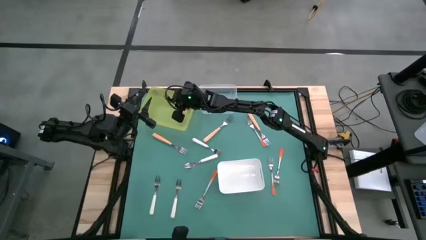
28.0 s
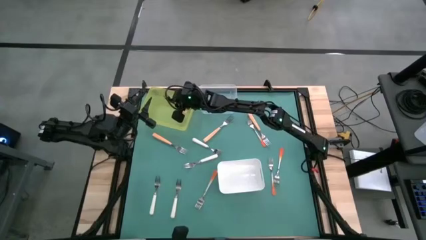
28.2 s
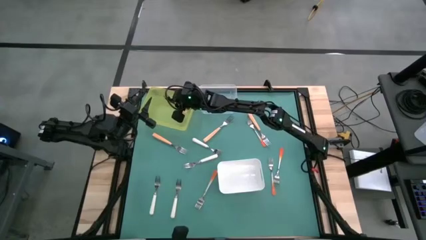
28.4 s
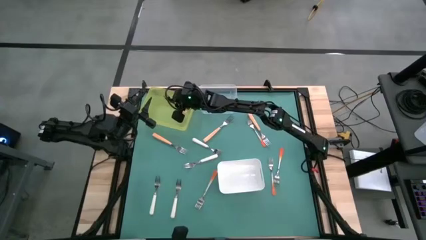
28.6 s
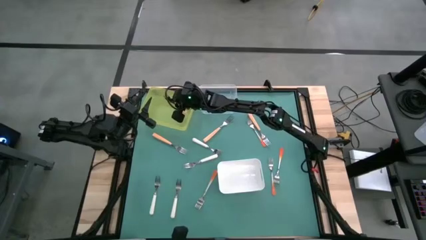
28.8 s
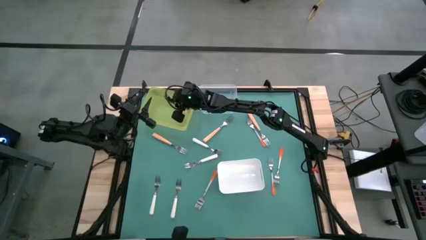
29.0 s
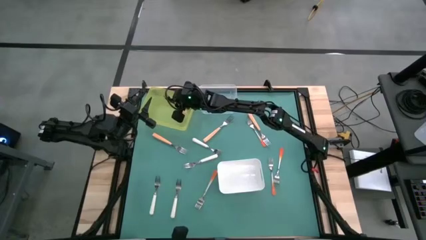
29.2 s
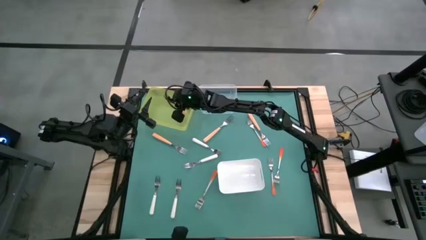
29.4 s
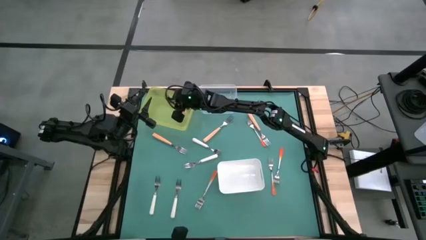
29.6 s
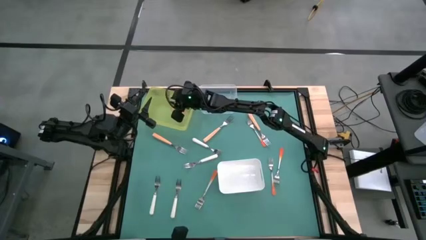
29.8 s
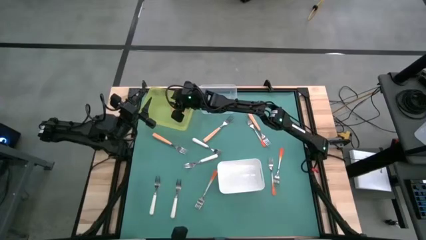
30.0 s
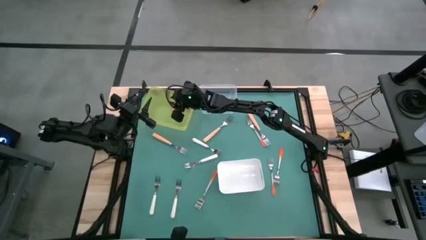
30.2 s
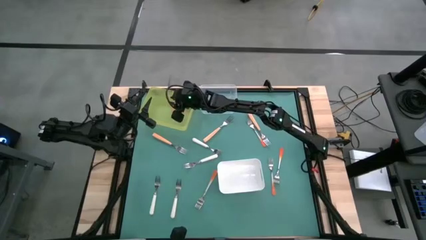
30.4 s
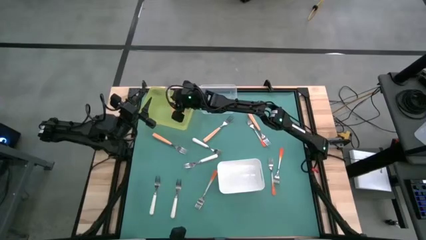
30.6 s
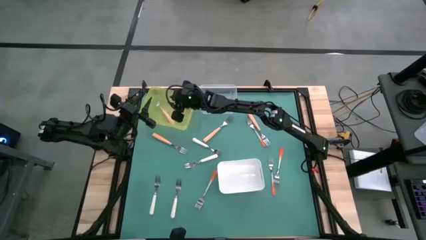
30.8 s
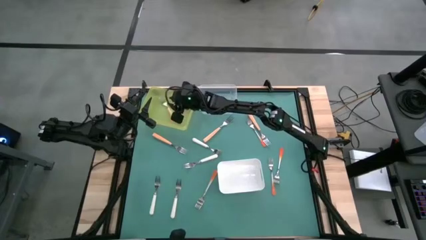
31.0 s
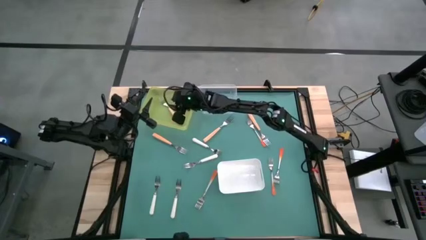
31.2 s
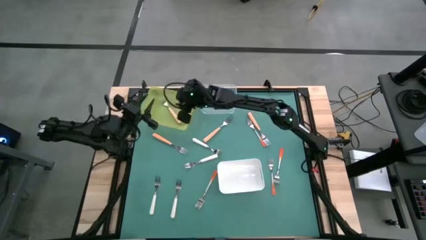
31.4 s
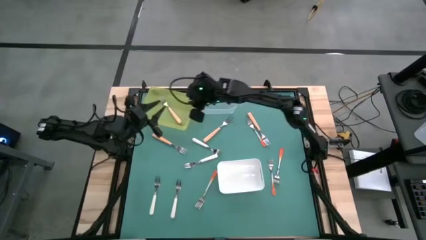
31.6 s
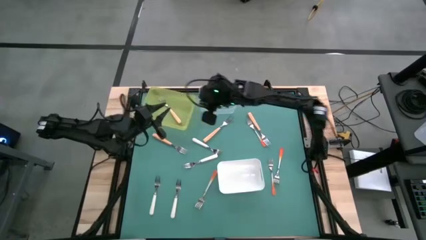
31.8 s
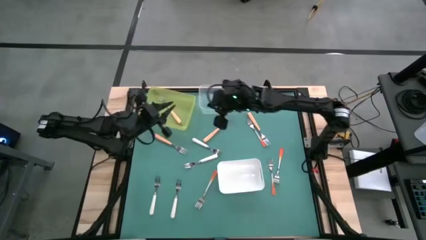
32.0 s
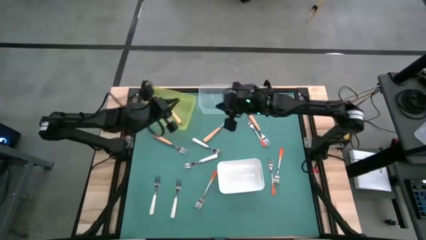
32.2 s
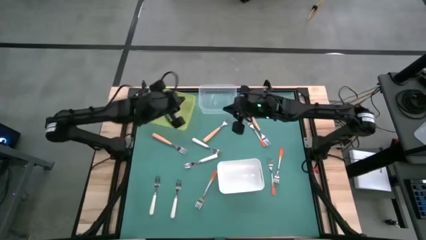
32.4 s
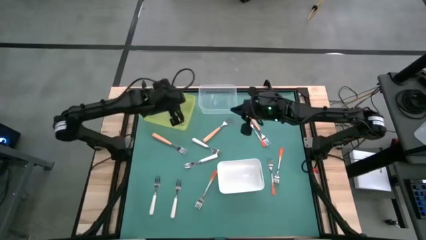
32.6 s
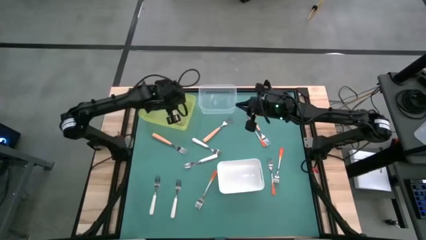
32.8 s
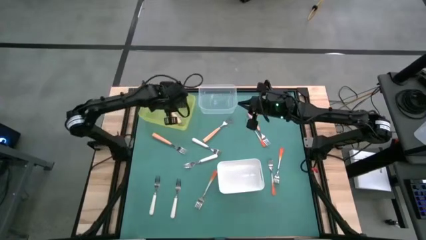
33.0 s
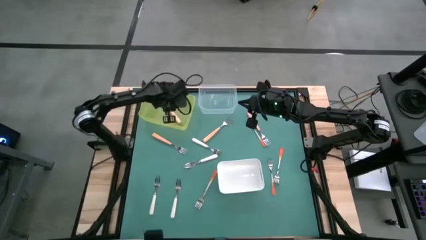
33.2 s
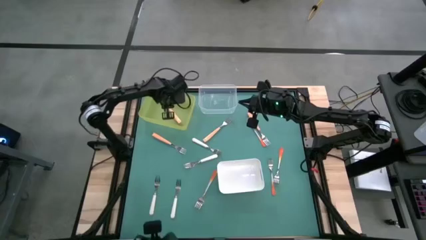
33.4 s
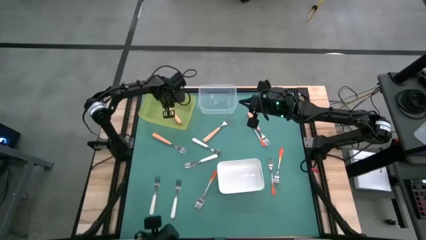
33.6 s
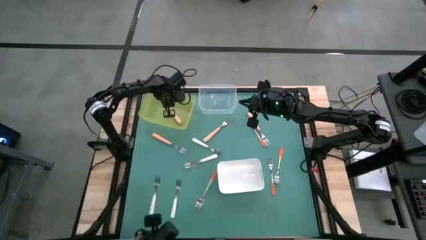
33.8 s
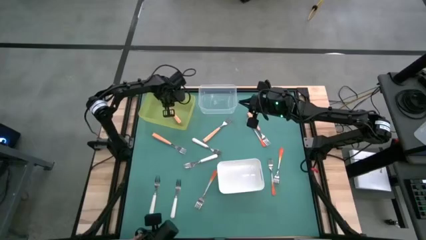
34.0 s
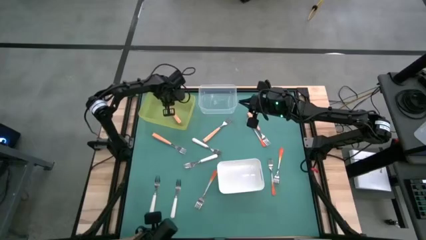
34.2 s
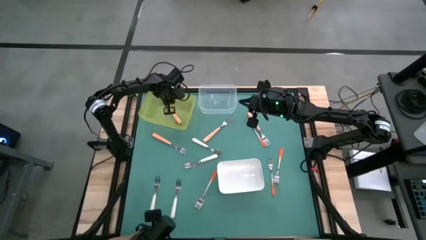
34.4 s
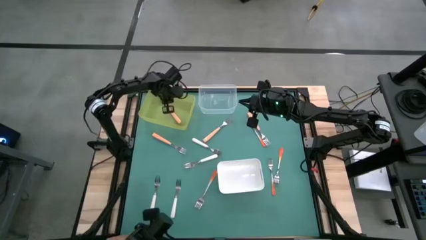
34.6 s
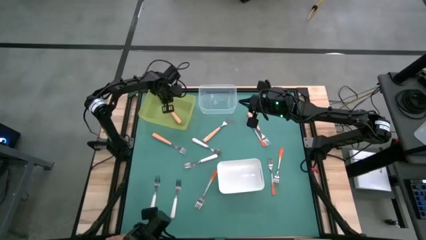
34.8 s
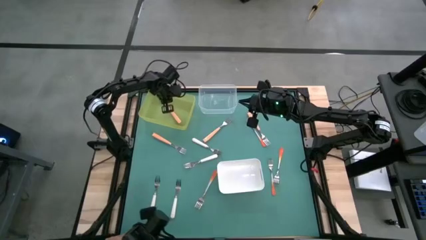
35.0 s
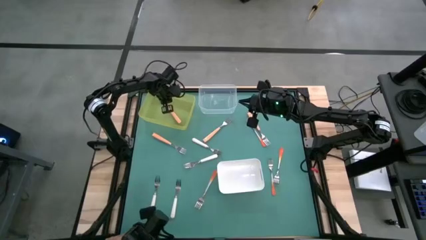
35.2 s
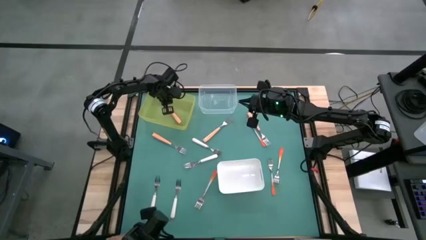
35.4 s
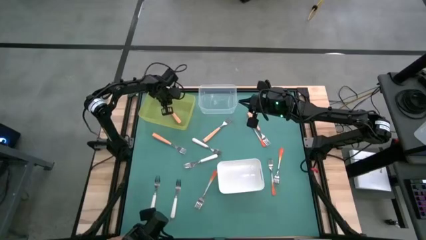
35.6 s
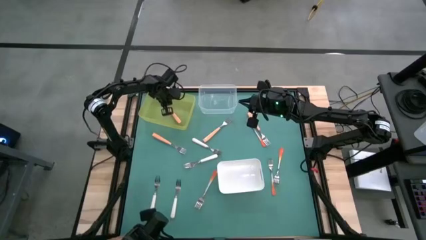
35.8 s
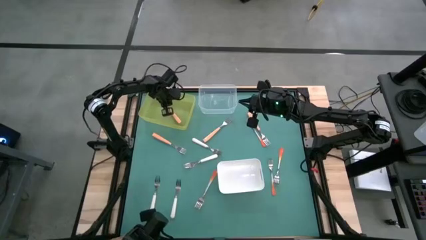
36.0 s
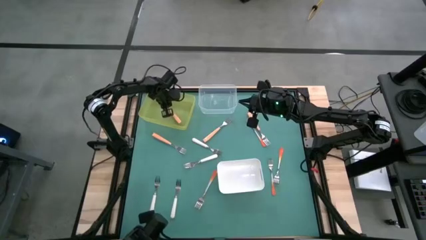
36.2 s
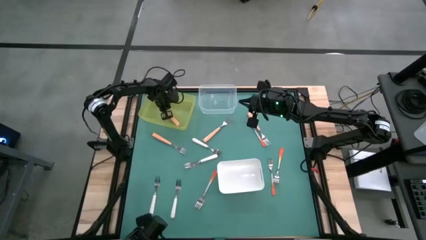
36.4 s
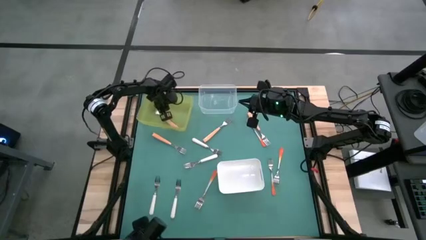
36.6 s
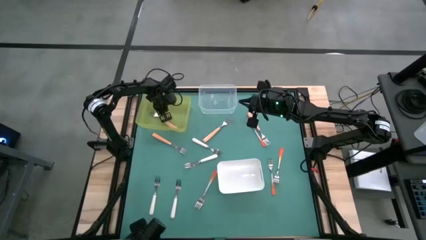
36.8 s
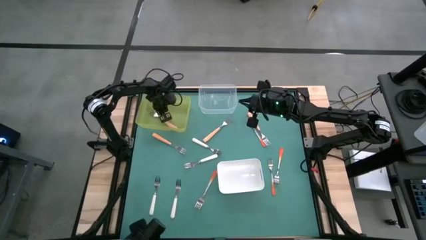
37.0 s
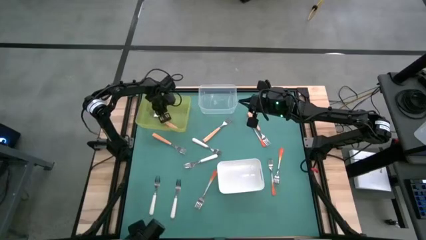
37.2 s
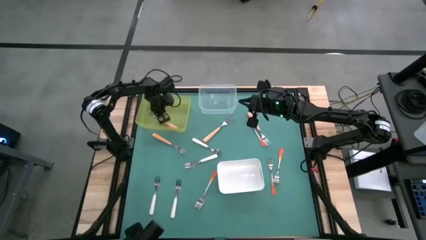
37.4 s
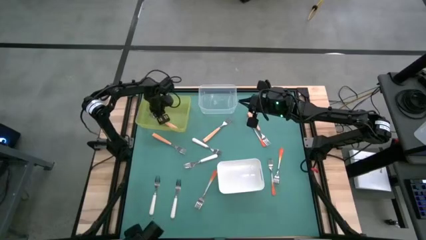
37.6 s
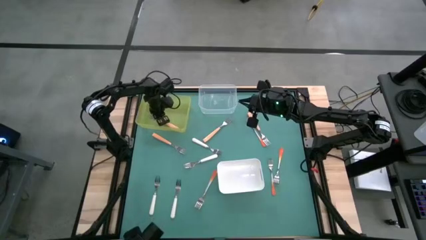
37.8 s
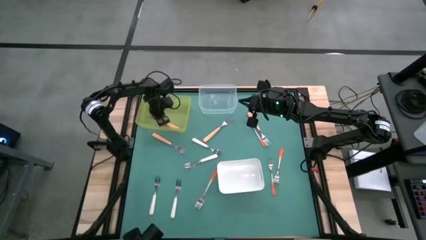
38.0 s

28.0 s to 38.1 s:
Task: Sort silverware by color (type)
Put the light orange into the yellow bin

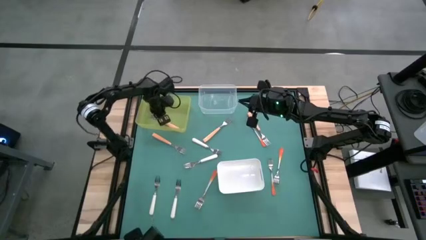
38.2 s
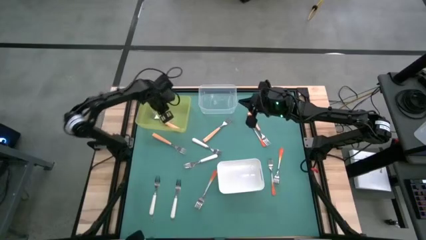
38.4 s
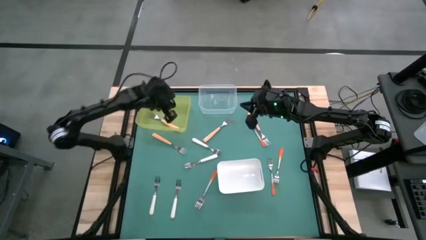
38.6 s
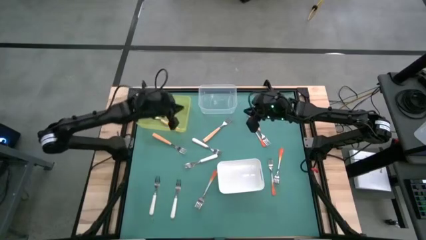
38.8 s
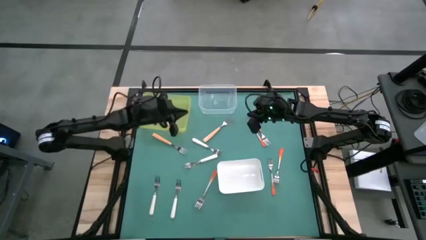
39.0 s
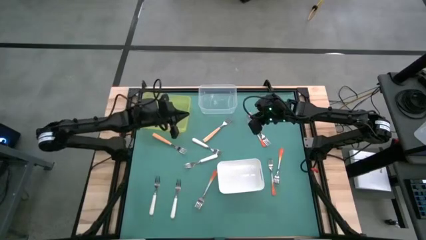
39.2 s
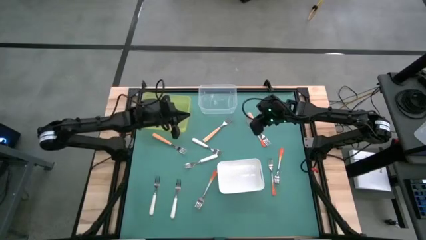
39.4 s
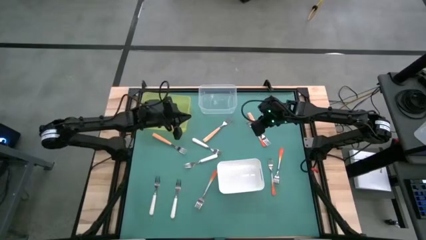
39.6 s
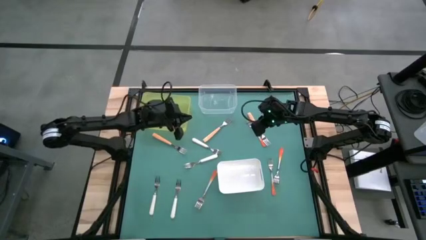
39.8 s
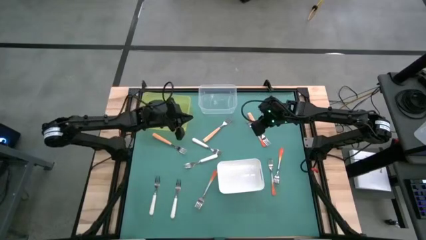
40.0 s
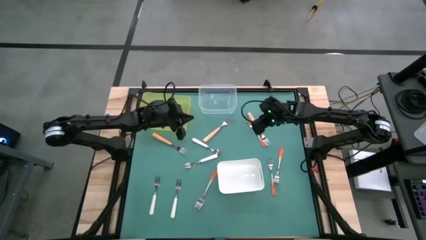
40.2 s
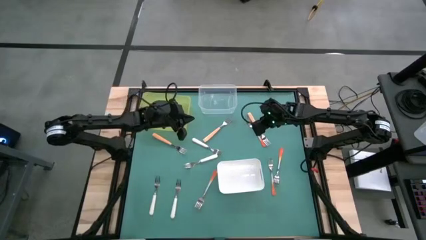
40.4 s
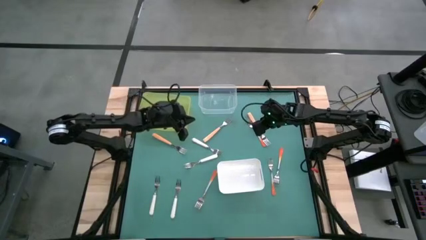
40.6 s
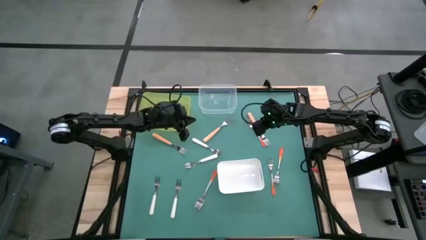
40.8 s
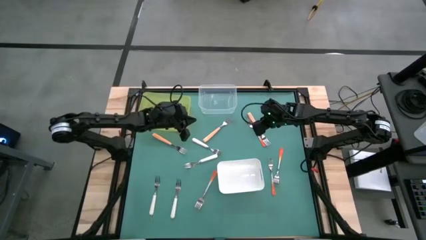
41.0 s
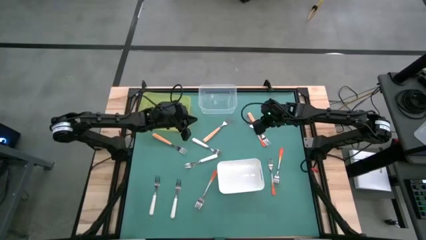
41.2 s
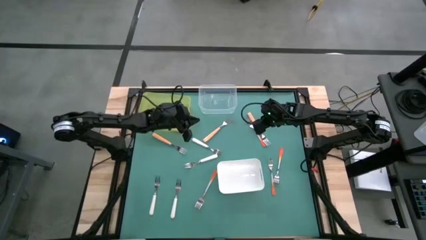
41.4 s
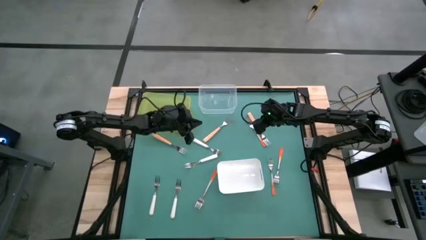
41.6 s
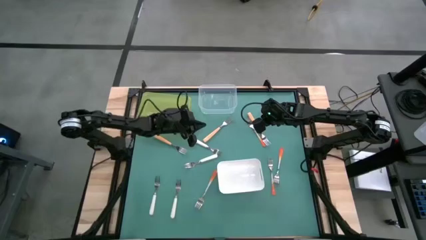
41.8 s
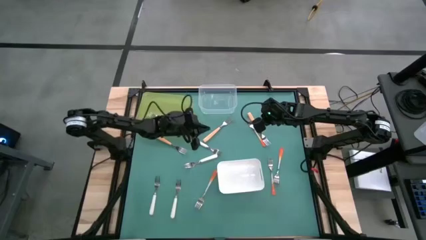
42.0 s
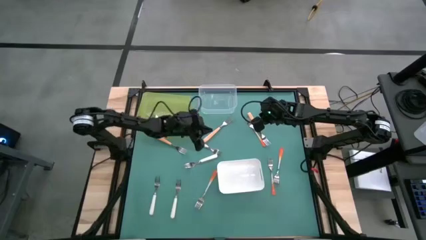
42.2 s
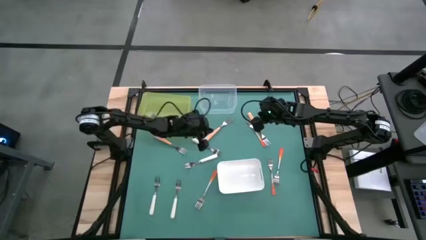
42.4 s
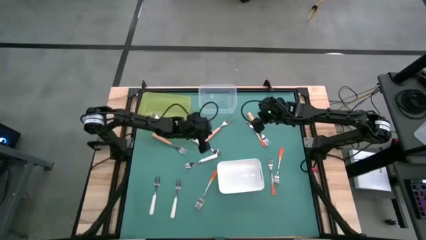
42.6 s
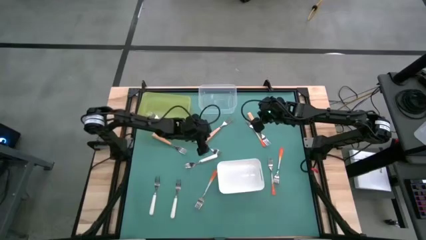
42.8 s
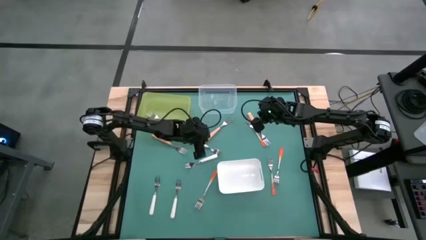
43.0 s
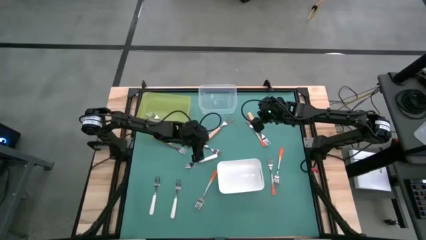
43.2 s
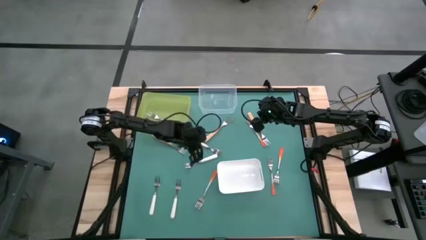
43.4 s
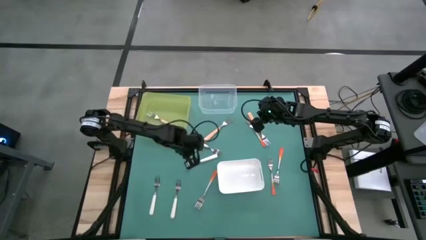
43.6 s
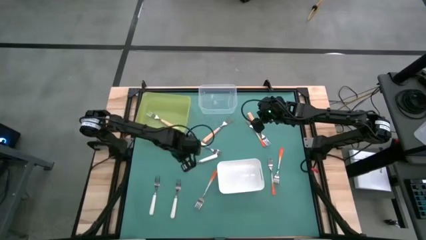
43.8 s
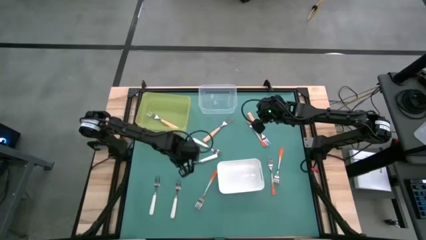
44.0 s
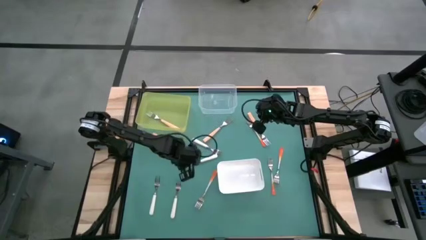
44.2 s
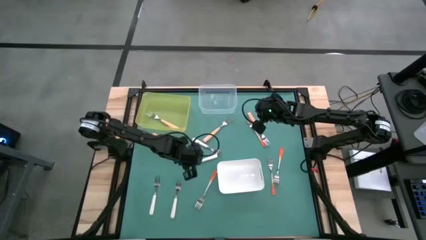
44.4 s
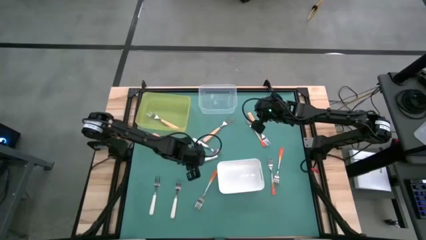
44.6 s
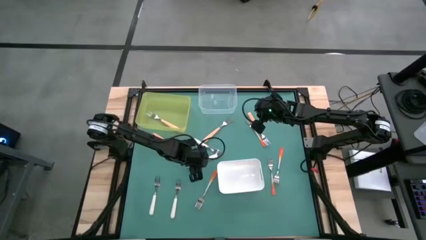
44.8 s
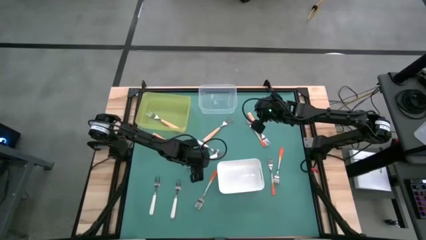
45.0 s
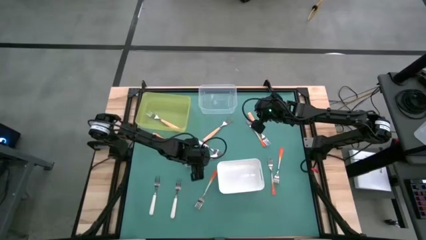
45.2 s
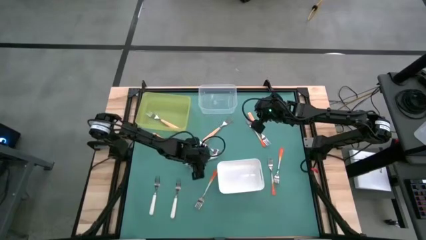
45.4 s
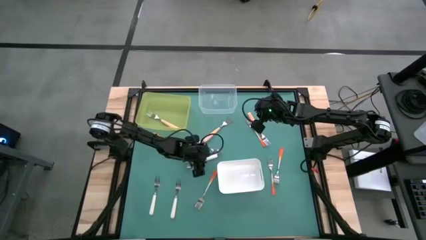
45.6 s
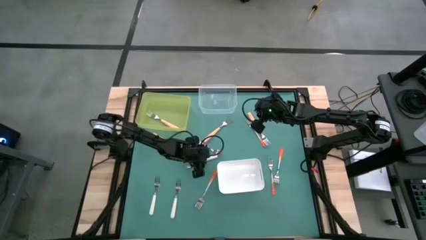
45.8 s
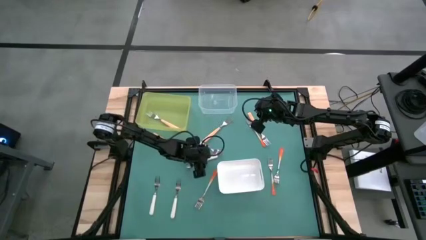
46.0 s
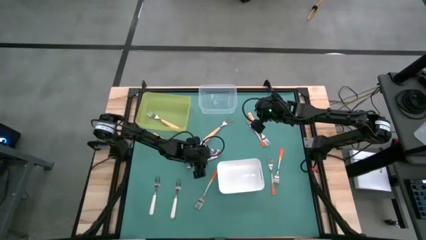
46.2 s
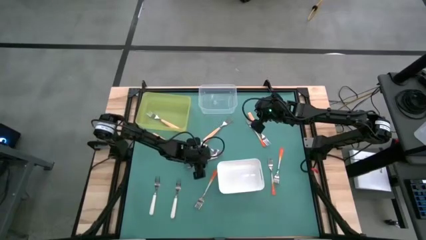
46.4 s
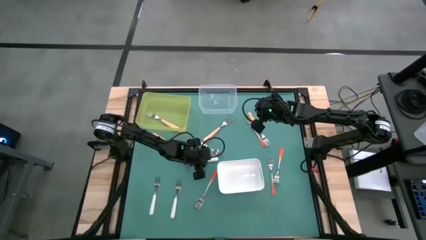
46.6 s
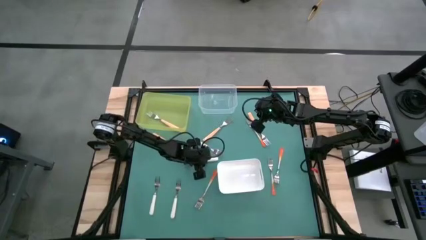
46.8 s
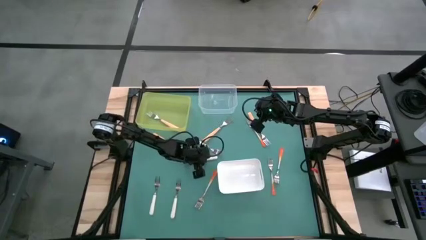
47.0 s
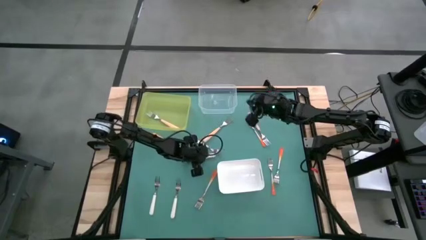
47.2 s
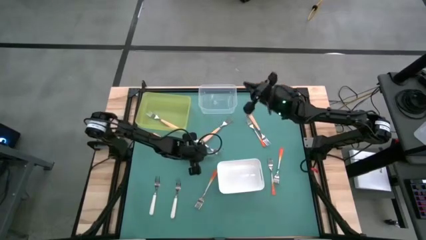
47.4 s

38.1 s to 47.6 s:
Put the white fork into the transparent bin
